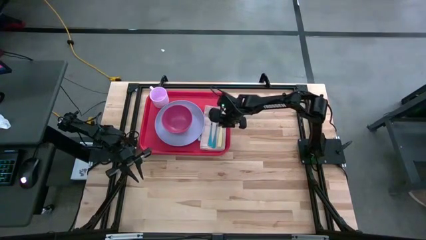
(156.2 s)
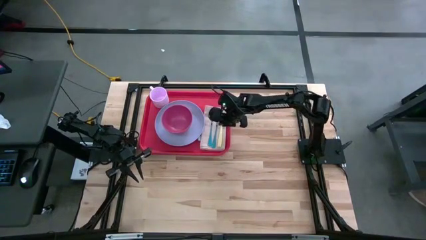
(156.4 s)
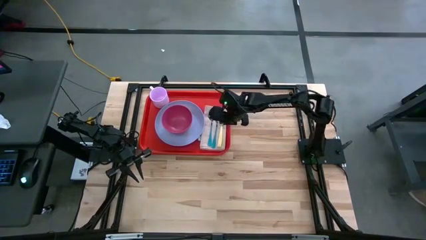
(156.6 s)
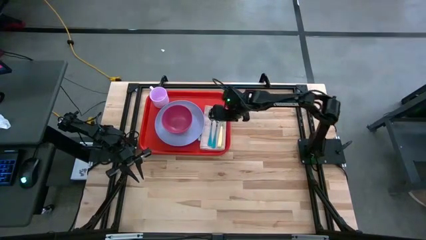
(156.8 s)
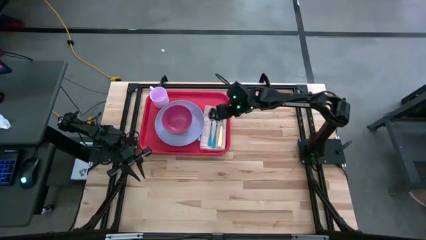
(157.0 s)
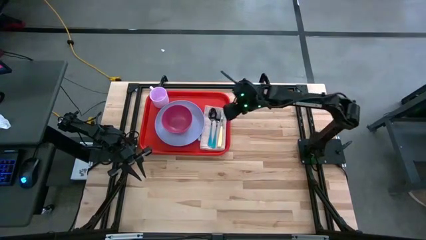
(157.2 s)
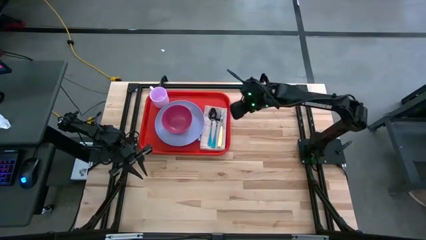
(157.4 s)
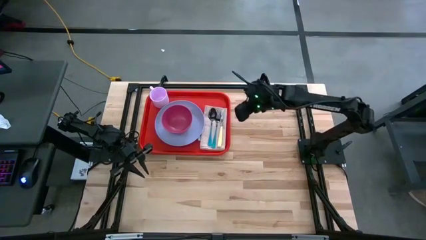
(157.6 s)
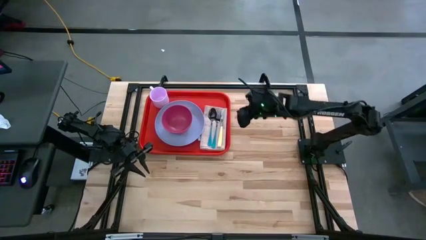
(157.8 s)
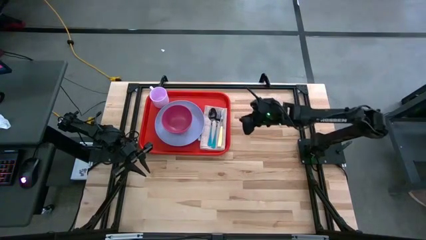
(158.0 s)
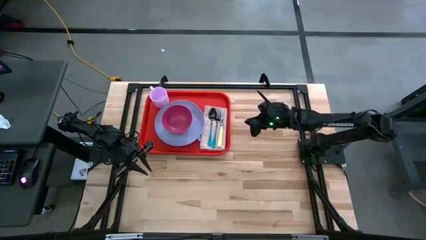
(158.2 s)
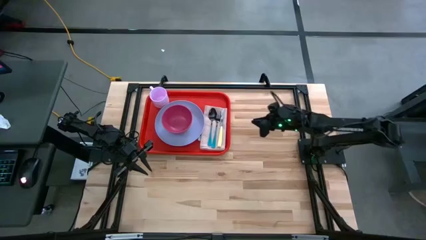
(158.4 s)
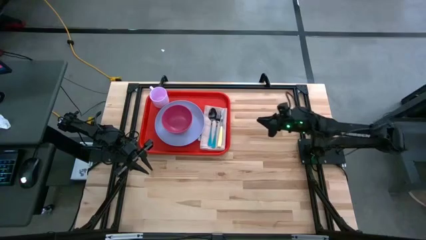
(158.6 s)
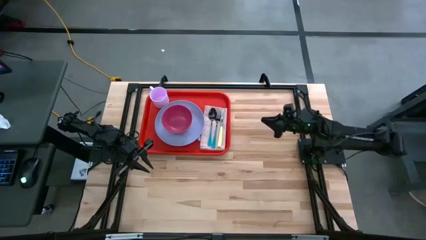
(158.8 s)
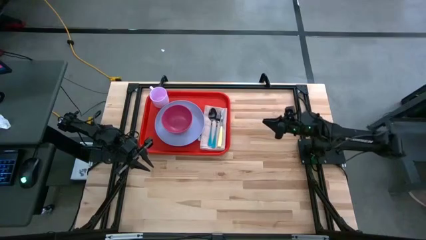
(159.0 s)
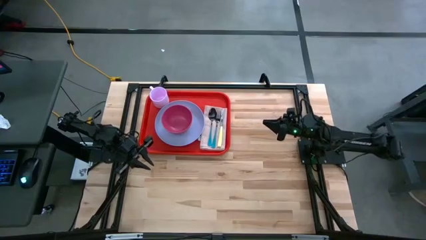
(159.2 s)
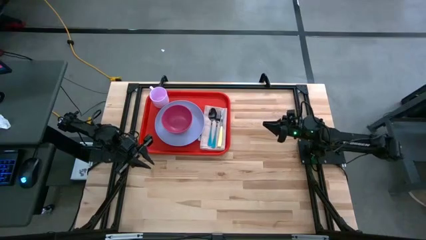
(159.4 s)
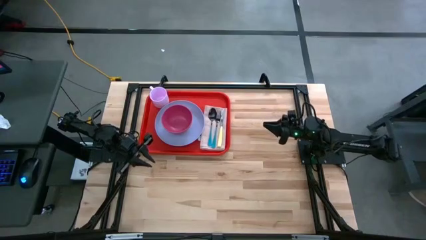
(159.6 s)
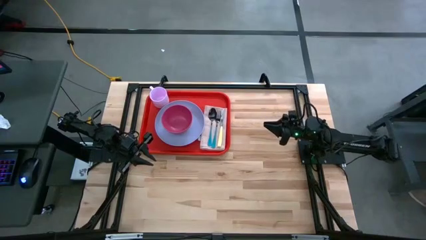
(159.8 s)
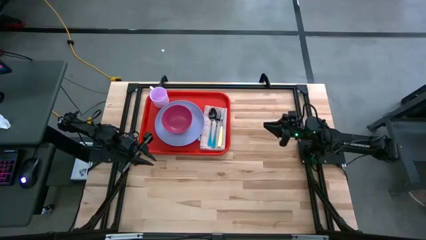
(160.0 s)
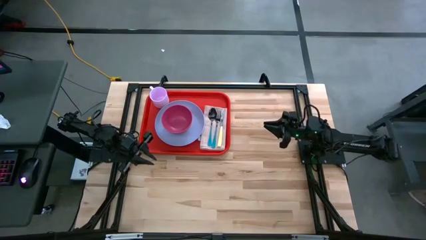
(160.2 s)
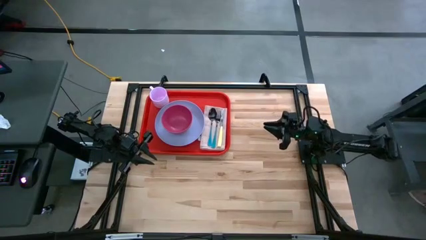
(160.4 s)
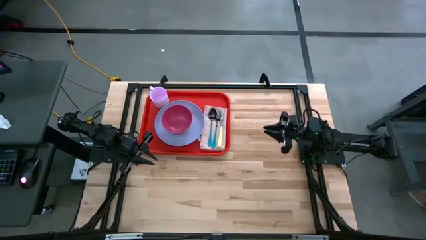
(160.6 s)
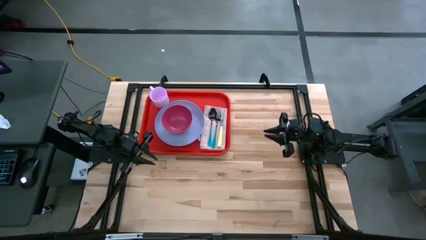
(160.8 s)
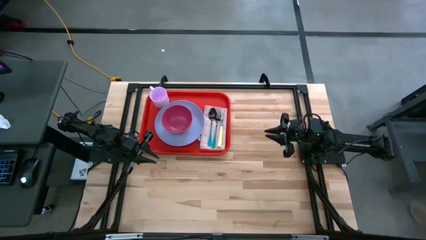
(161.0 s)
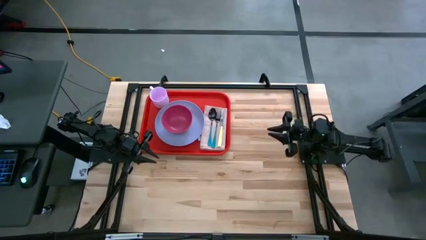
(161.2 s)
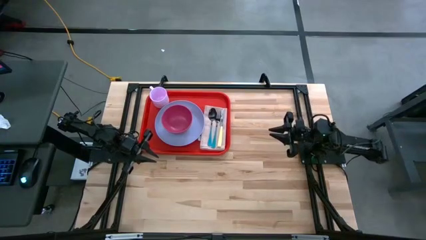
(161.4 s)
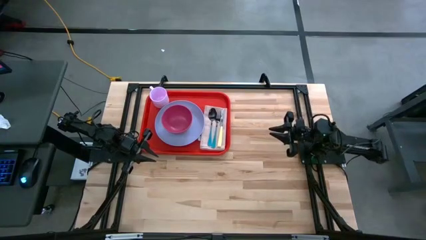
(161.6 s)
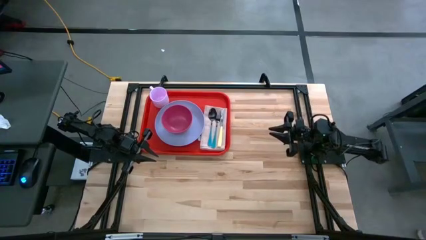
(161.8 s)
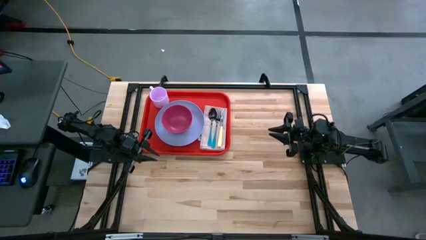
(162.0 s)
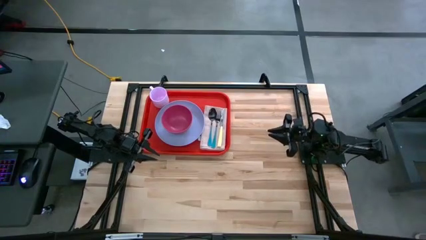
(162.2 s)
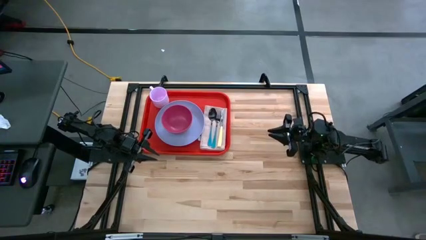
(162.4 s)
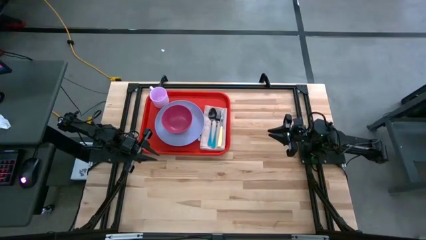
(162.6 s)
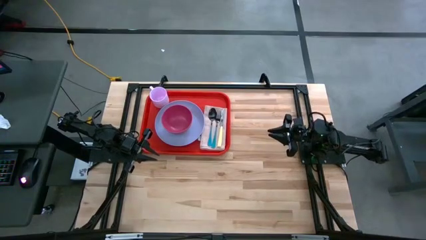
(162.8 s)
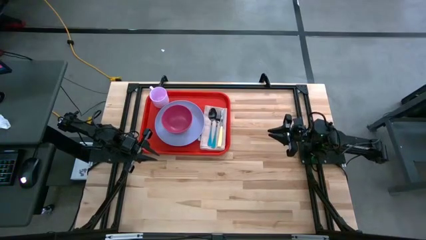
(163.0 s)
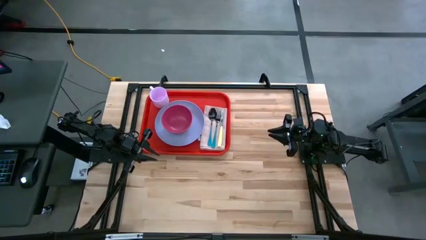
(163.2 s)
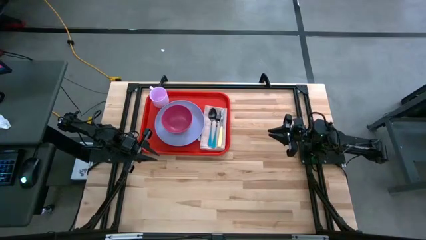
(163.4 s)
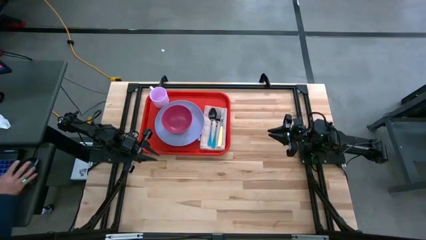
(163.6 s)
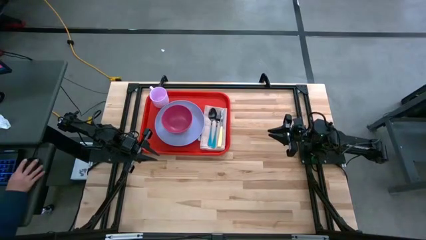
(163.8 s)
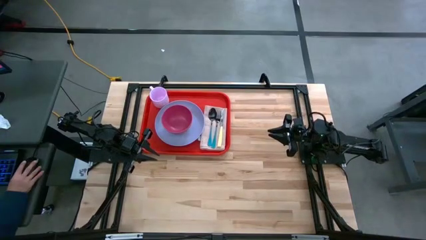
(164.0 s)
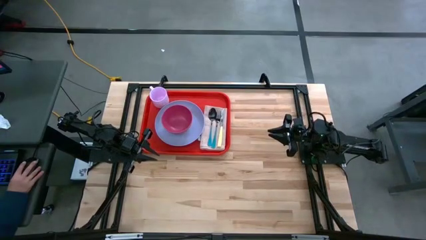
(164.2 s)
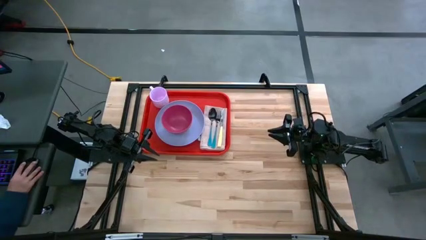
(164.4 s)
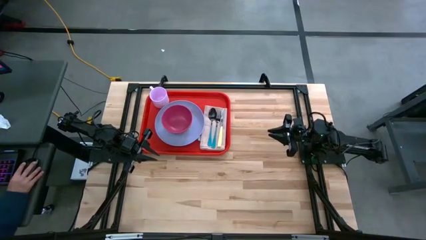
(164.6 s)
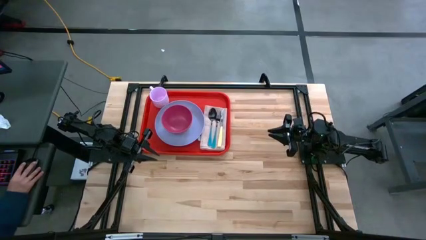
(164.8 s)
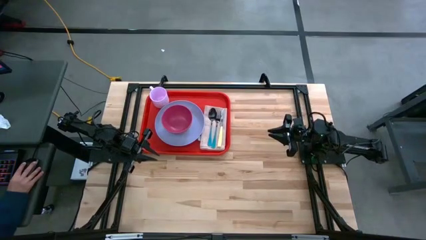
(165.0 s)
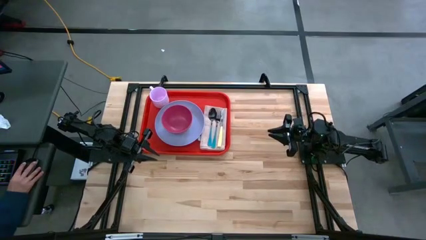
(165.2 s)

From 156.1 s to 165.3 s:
Task: Set up tray
Return to home position
